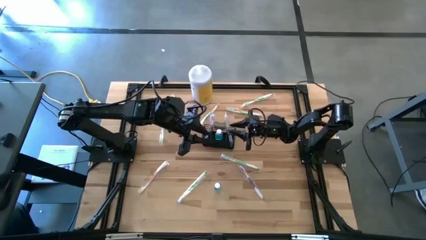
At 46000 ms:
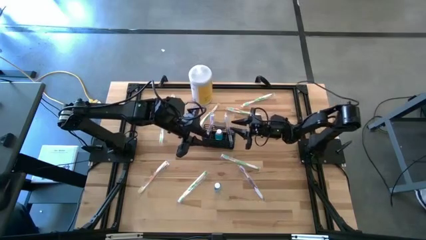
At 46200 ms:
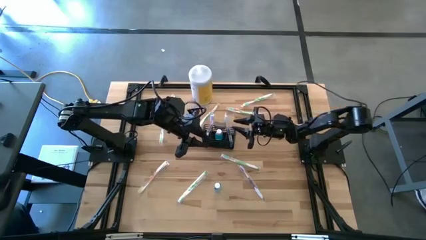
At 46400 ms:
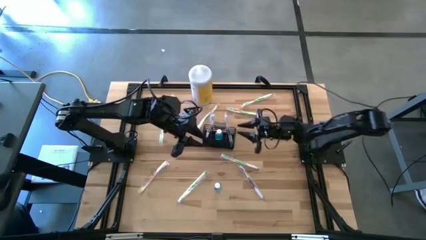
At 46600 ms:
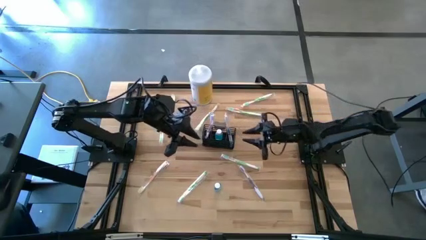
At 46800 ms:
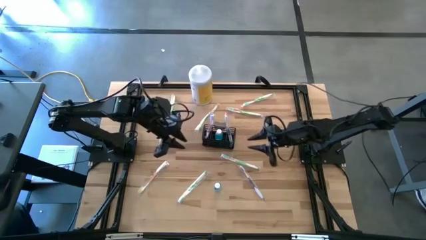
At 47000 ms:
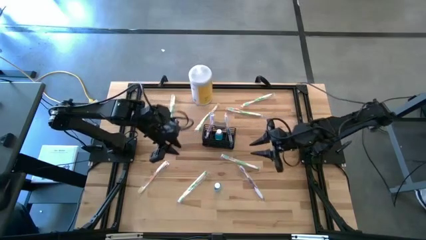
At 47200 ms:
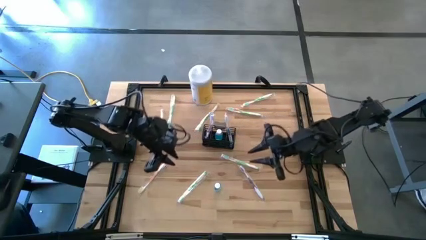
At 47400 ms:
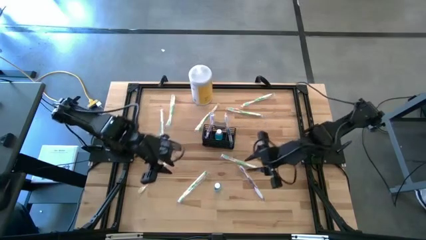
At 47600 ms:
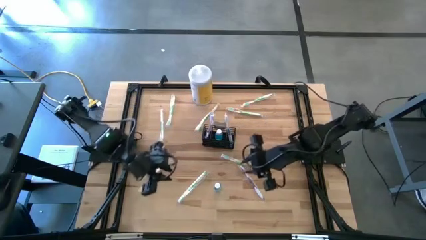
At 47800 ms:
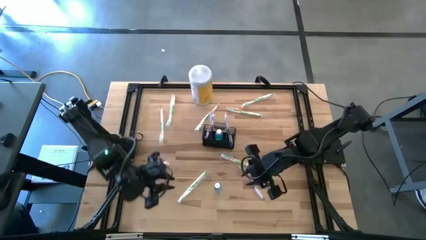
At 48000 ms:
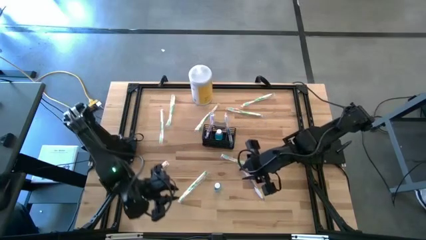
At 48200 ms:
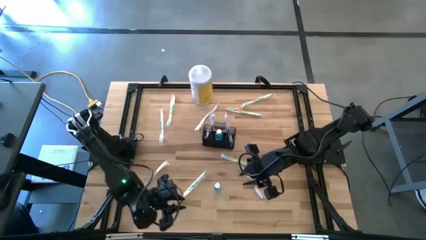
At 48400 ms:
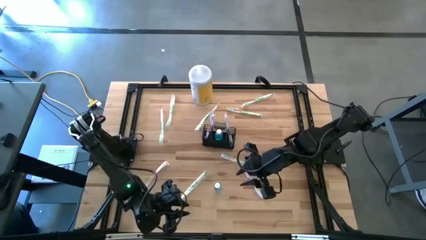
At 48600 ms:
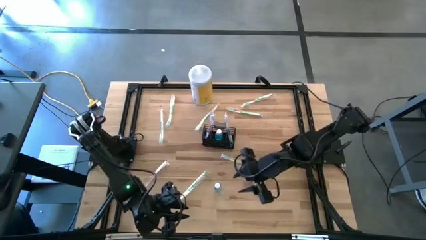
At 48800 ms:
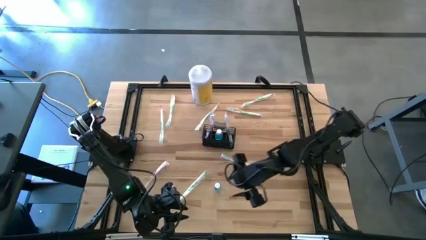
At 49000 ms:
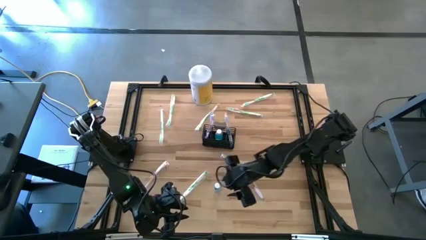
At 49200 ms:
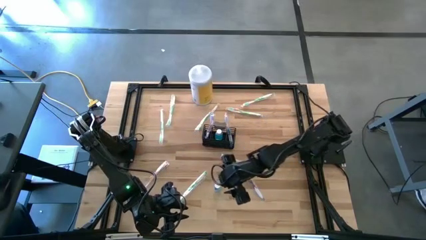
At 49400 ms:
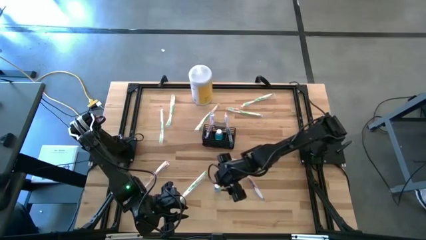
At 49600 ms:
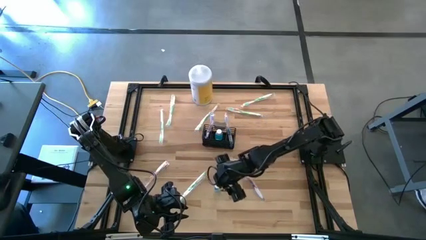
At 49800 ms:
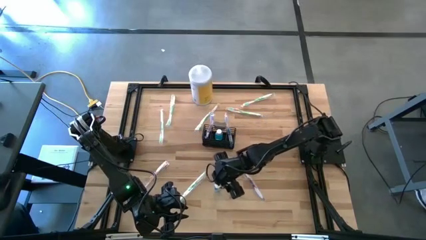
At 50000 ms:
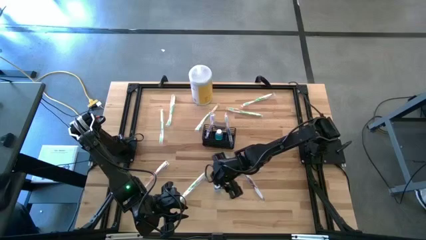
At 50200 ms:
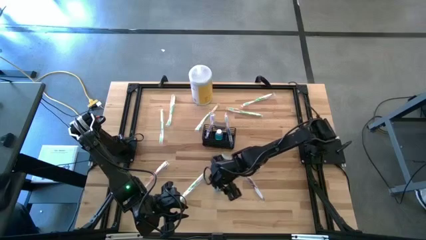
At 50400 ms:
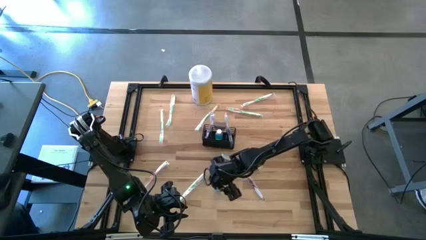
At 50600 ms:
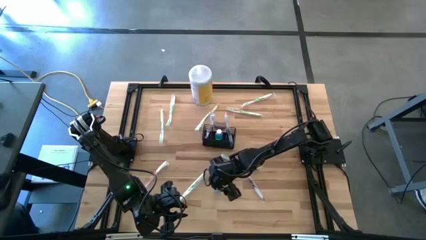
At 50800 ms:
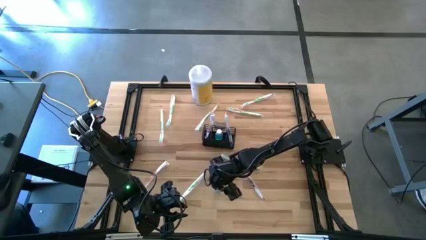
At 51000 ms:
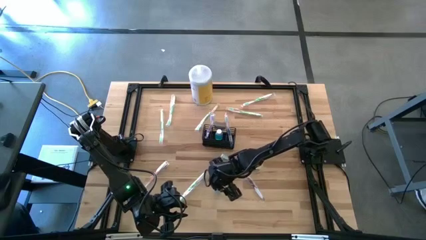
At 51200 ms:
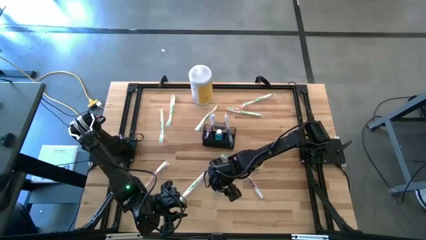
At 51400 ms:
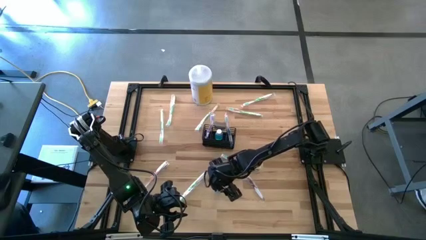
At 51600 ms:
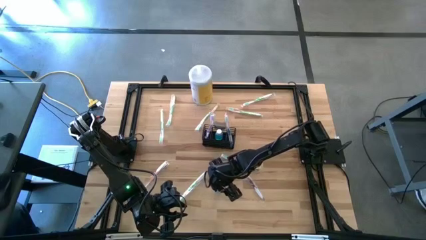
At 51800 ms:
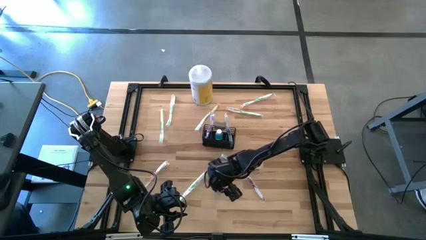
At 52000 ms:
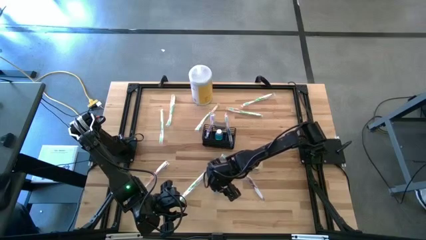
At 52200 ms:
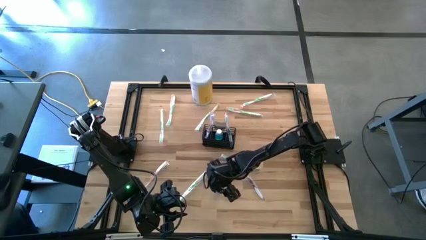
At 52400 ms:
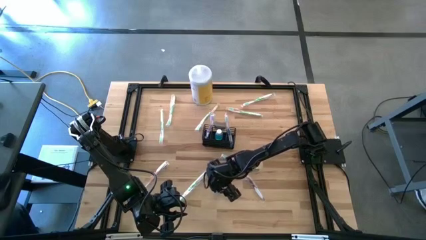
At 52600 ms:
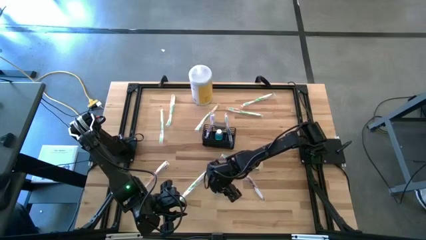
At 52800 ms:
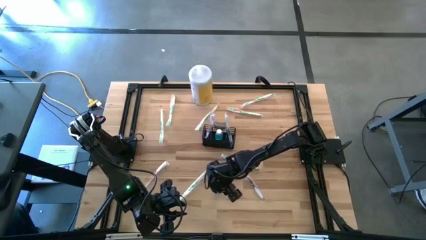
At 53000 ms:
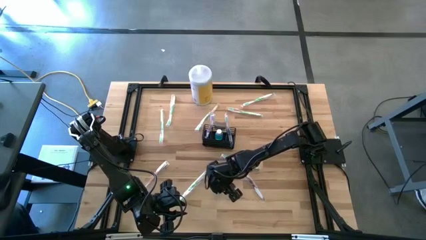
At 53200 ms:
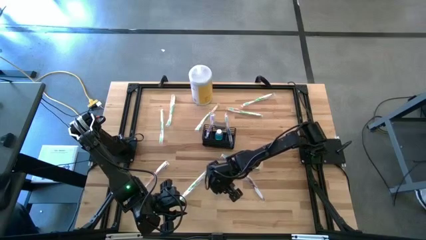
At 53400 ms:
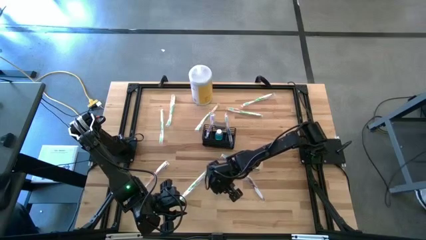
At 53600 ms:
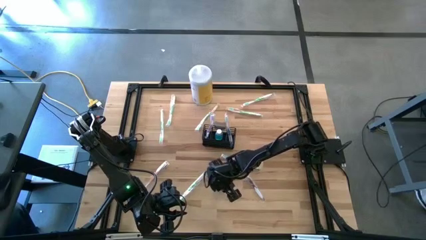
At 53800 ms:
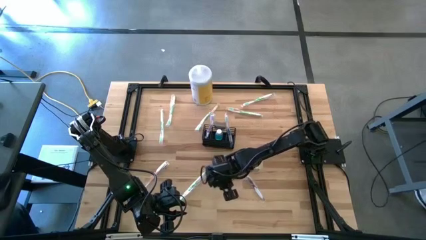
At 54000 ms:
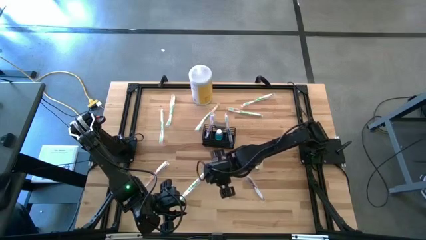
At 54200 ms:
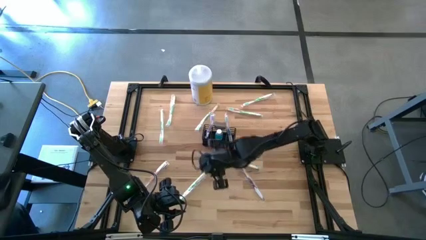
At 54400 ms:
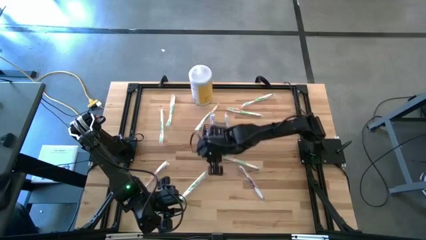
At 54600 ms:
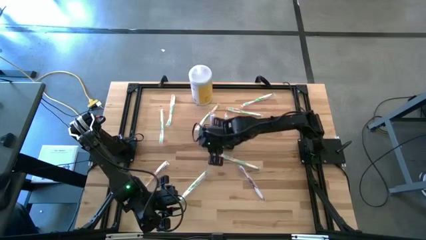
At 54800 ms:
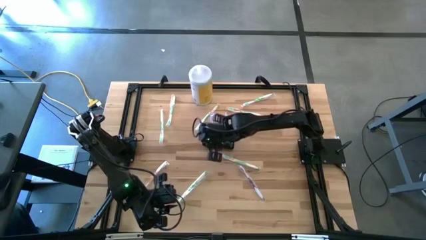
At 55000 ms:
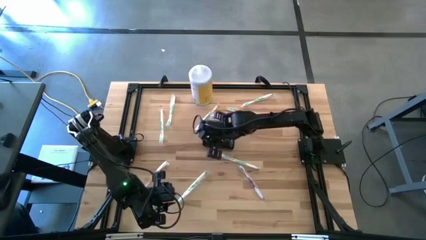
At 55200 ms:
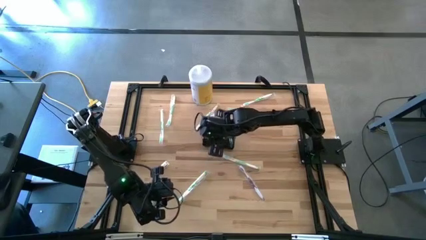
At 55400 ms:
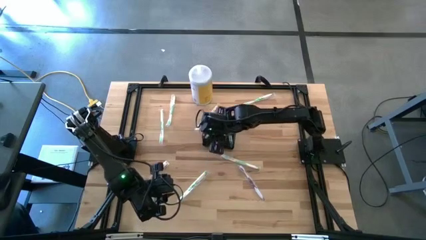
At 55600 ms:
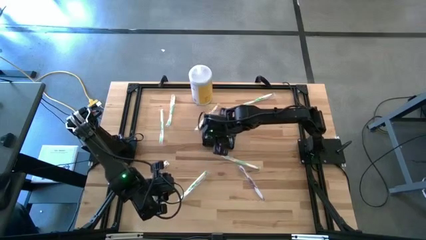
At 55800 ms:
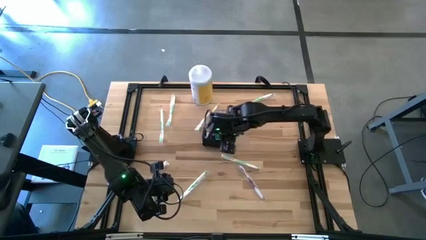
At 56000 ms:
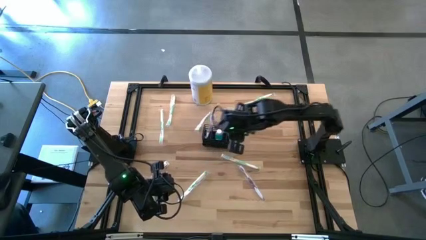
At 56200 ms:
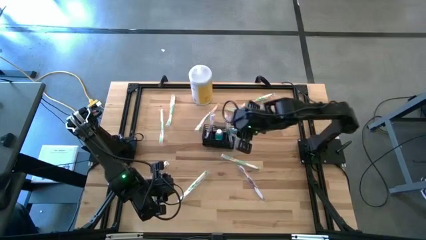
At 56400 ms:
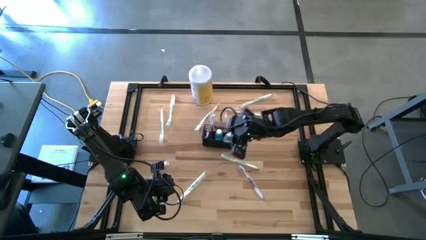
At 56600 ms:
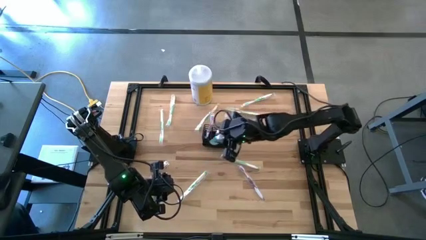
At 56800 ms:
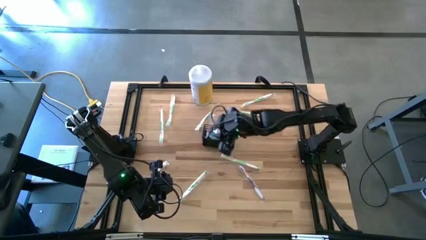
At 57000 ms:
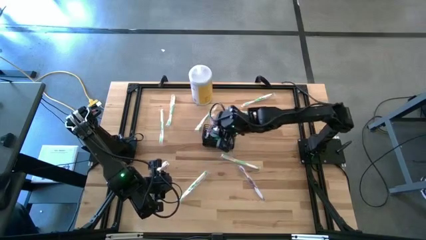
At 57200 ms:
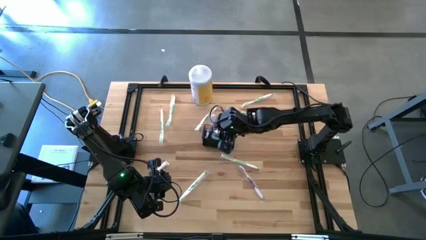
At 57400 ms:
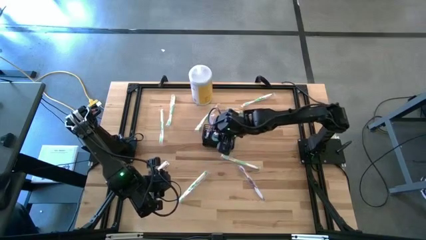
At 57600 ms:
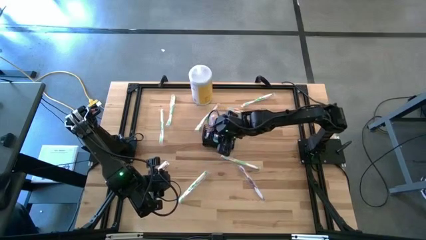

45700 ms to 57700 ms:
Task: Pick & Place toothbrushing station
Put the blue mouthwash into the middle section wire organizer
